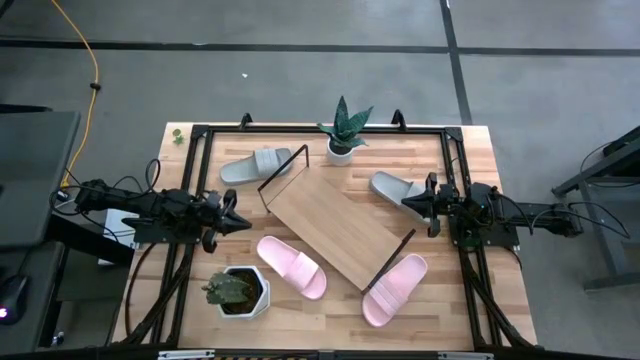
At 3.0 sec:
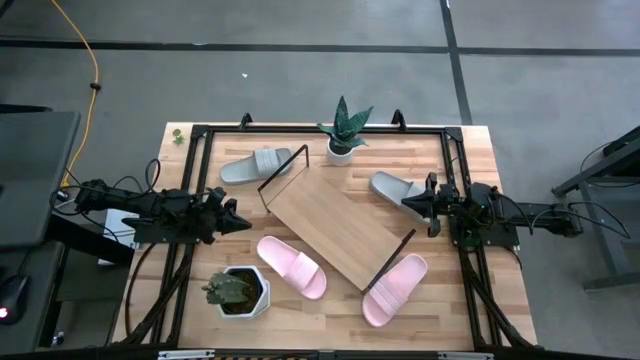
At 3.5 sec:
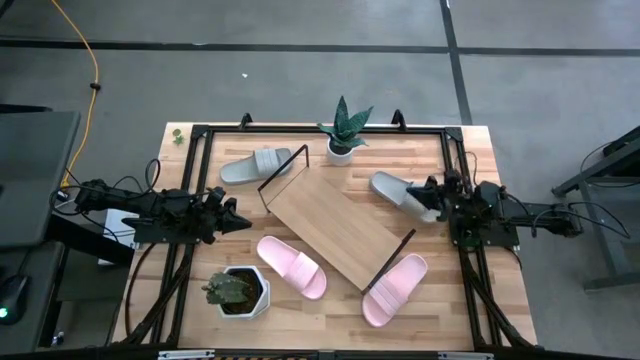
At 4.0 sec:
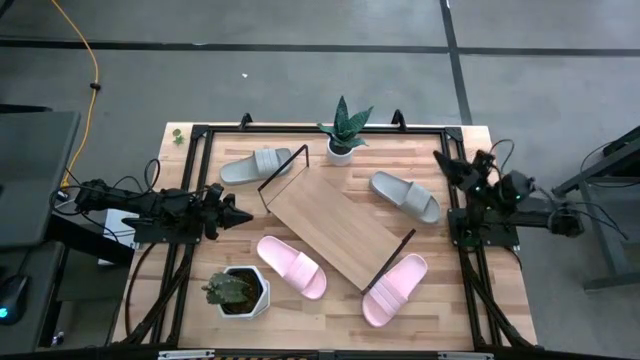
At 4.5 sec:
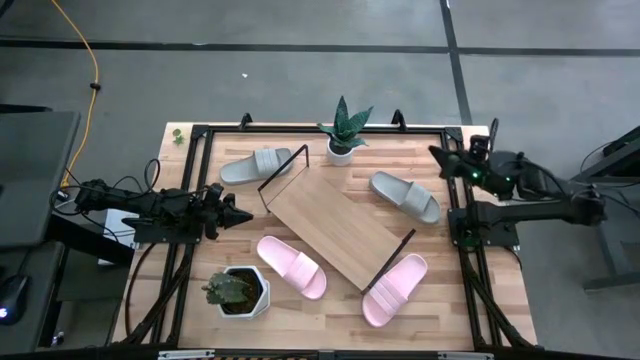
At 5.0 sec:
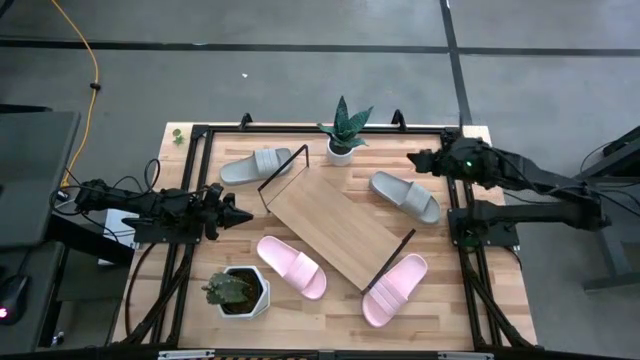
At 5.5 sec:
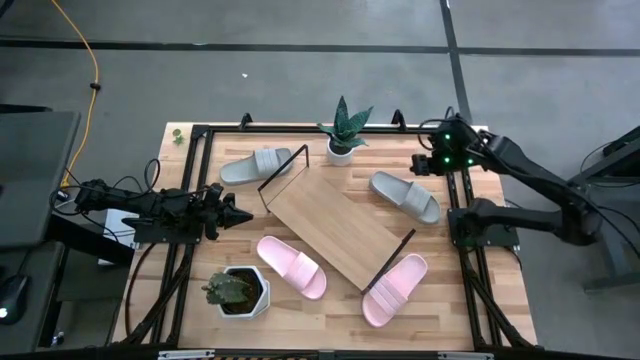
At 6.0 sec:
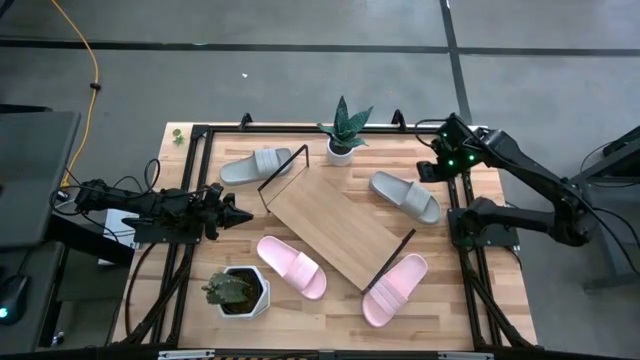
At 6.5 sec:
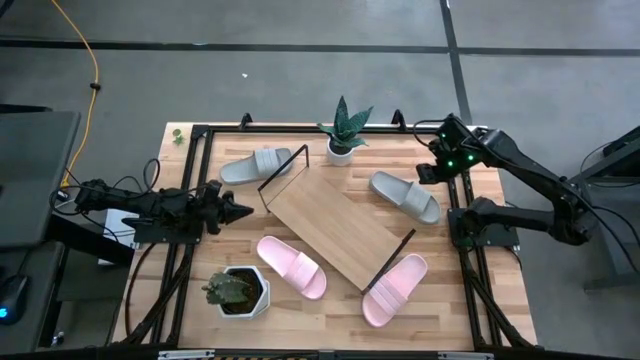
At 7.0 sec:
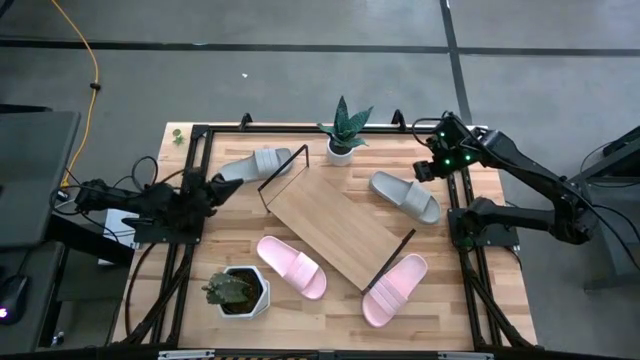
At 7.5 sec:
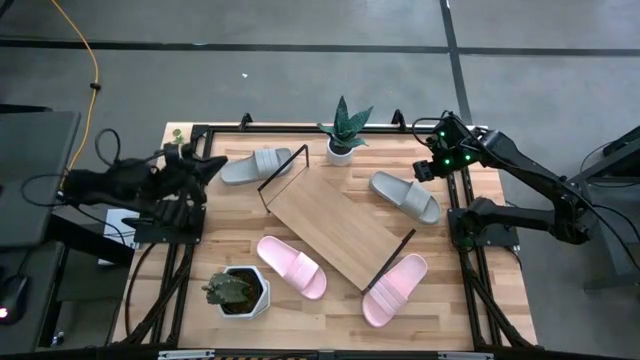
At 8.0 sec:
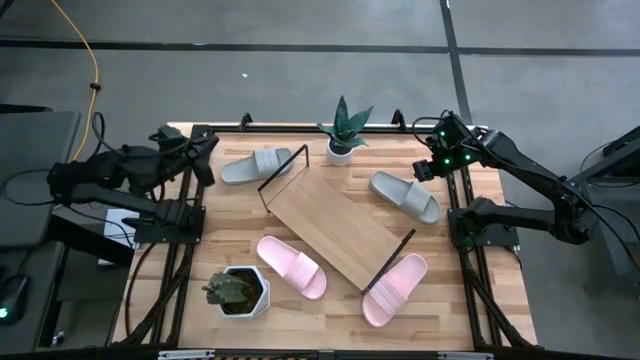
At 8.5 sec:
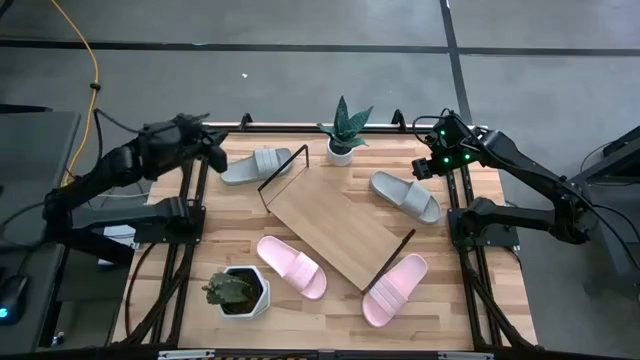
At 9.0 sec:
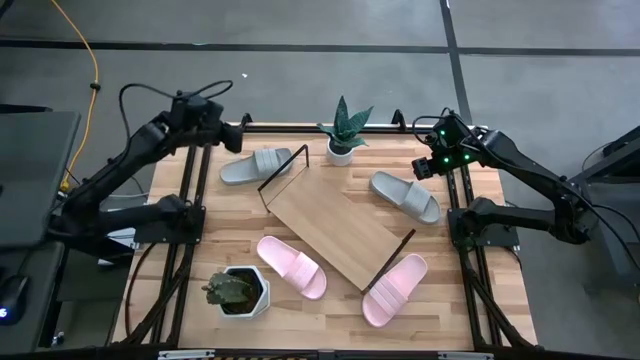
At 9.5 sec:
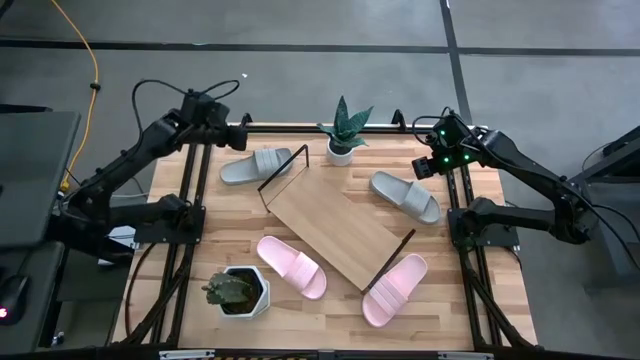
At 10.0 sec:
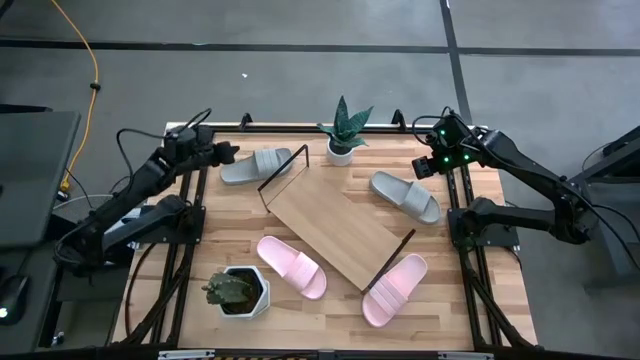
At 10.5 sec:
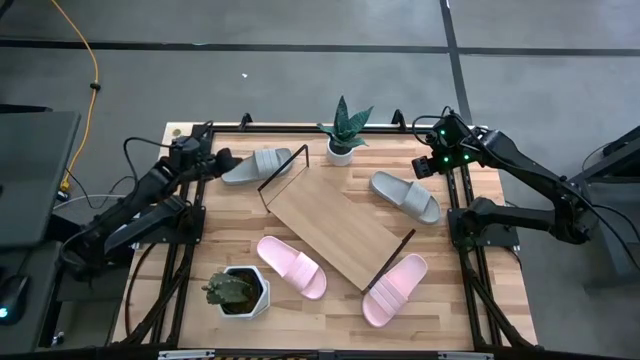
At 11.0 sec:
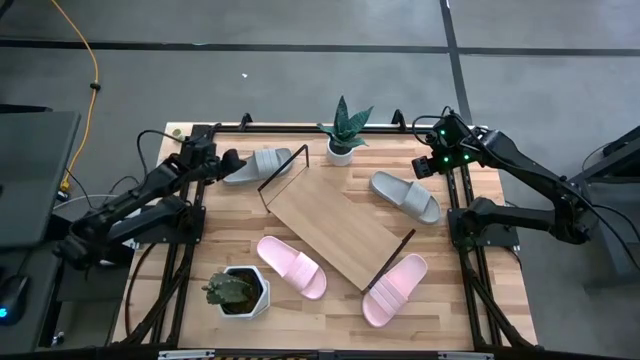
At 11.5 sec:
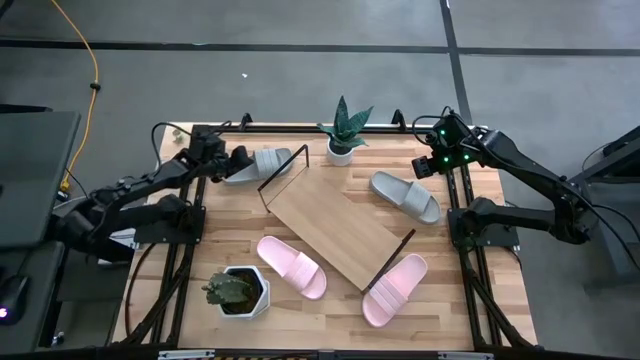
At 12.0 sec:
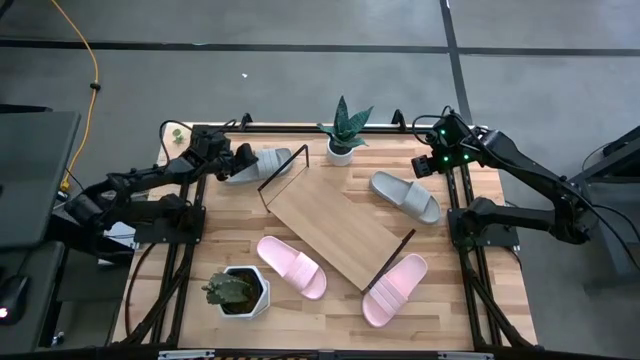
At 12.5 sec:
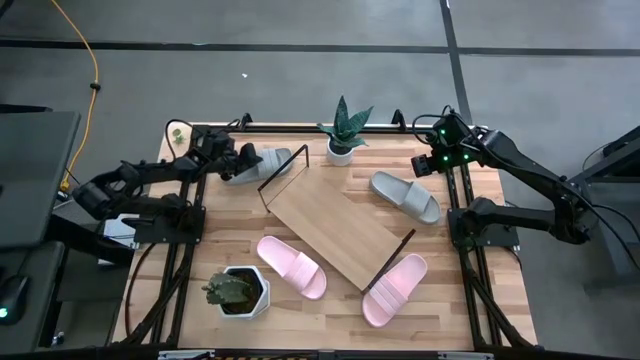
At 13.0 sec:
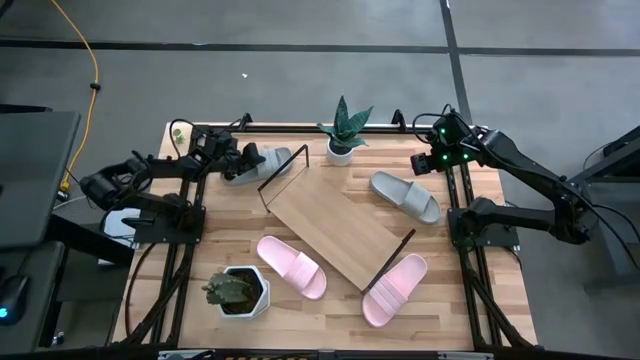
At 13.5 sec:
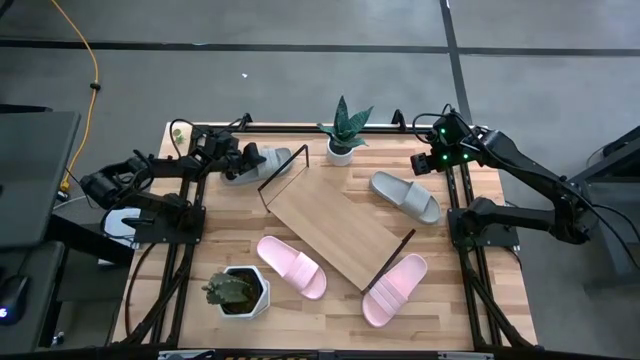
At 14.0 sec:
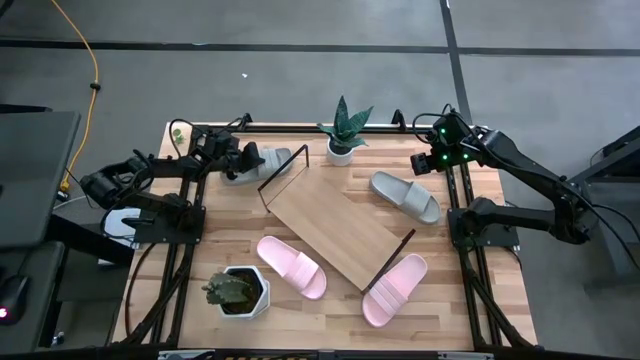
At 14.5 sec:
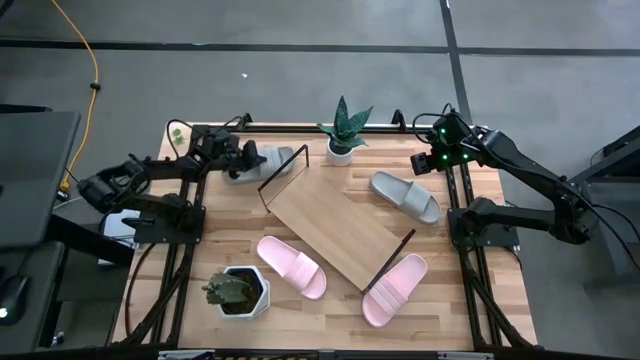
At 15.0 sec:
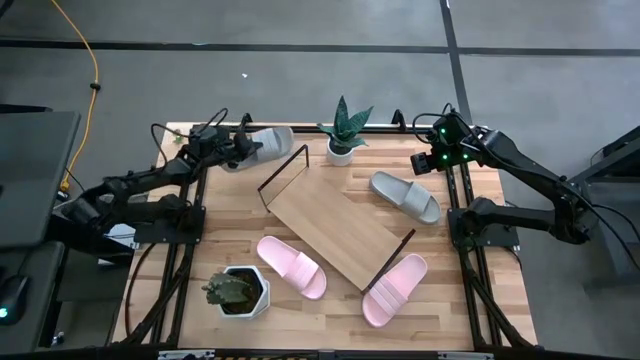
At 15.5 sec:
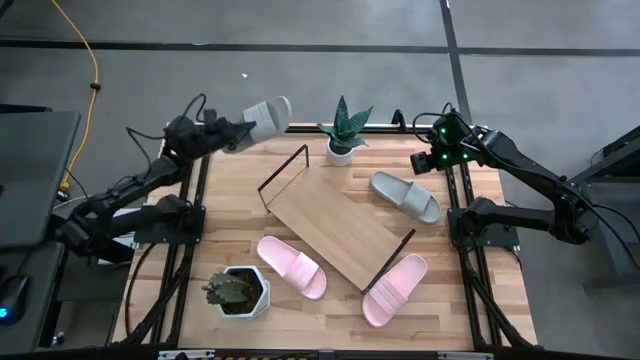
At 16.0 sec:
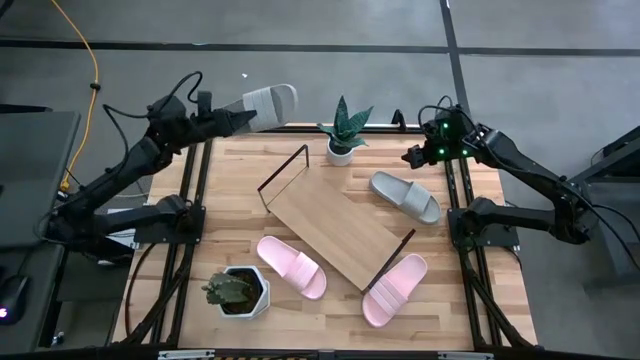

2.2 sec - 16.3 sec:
Task: Pick and place slides into the shelf
Put the left gray slide on the shelf
